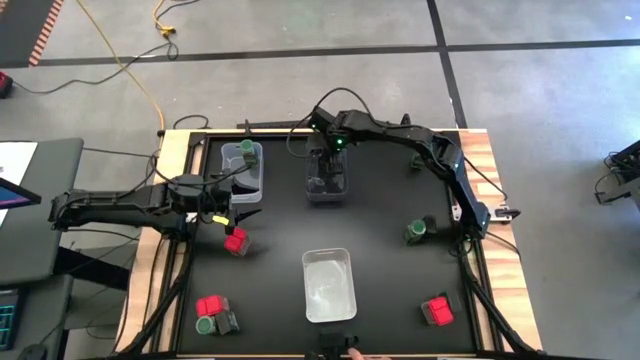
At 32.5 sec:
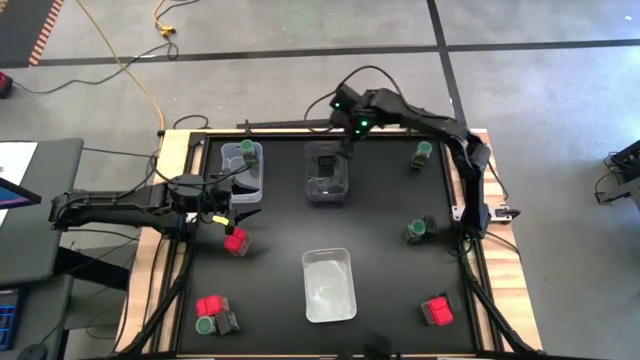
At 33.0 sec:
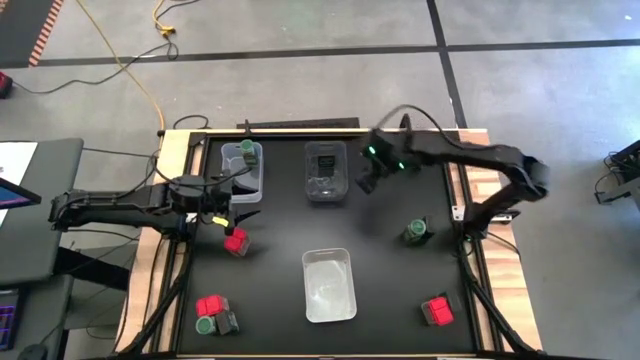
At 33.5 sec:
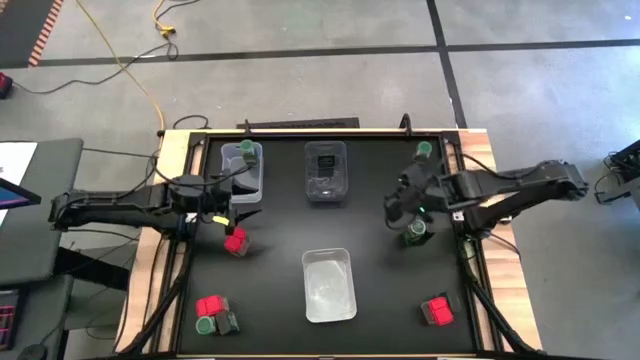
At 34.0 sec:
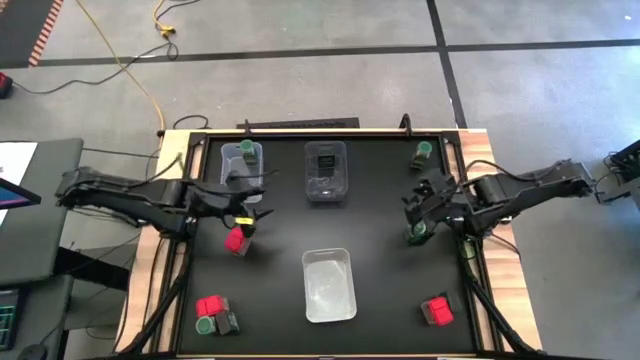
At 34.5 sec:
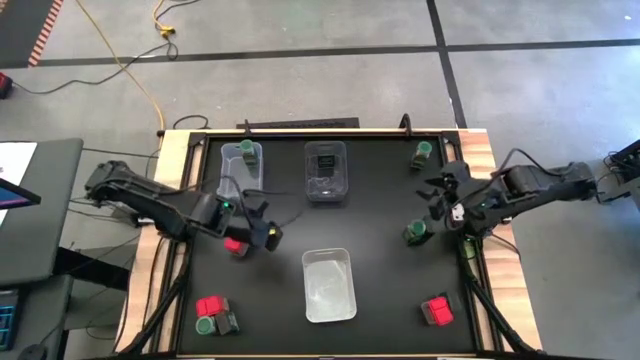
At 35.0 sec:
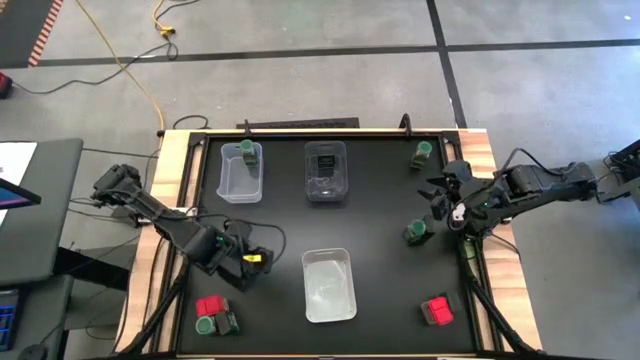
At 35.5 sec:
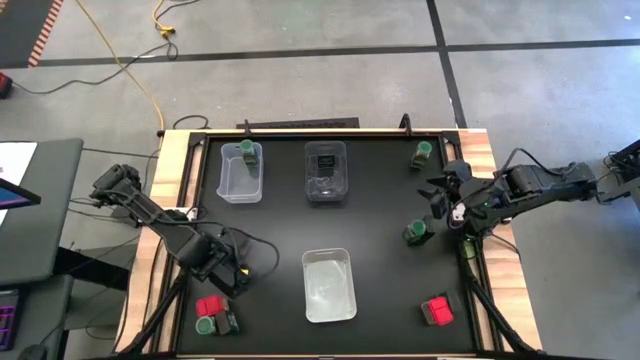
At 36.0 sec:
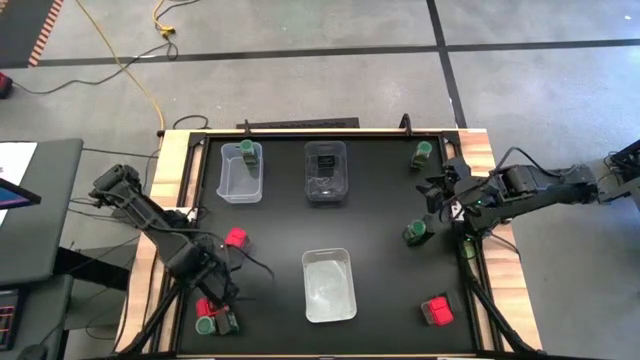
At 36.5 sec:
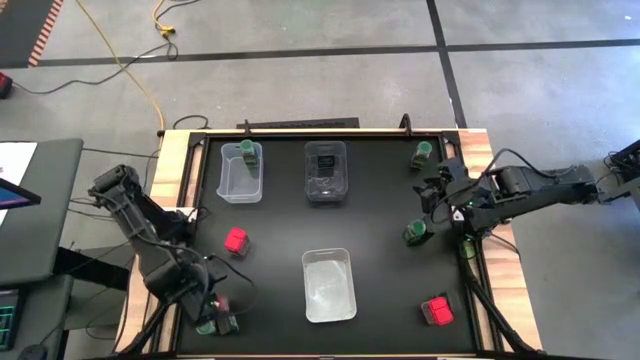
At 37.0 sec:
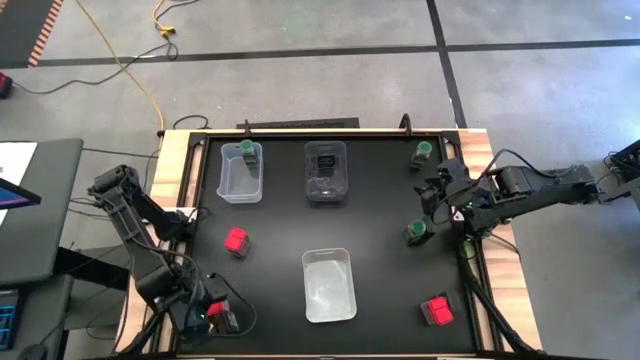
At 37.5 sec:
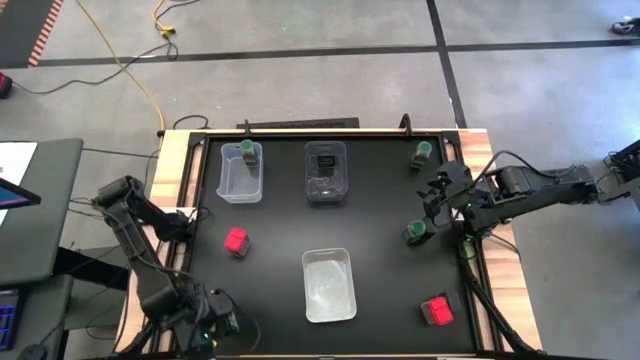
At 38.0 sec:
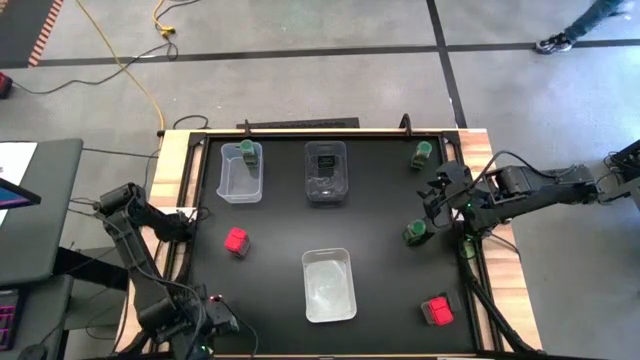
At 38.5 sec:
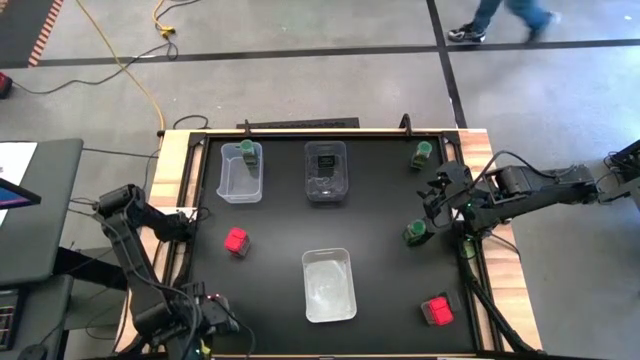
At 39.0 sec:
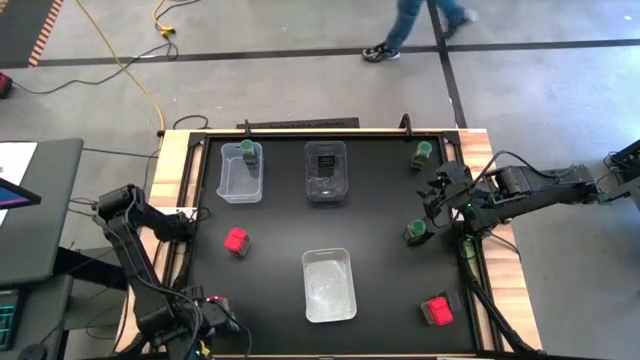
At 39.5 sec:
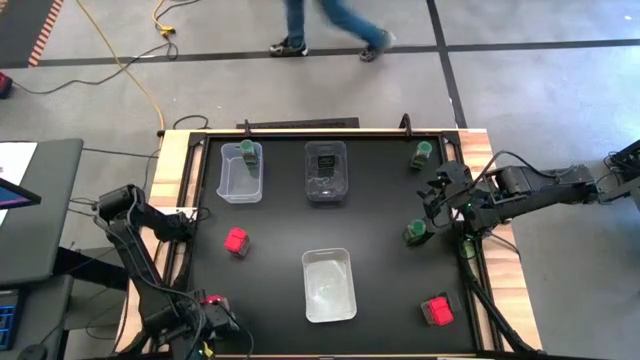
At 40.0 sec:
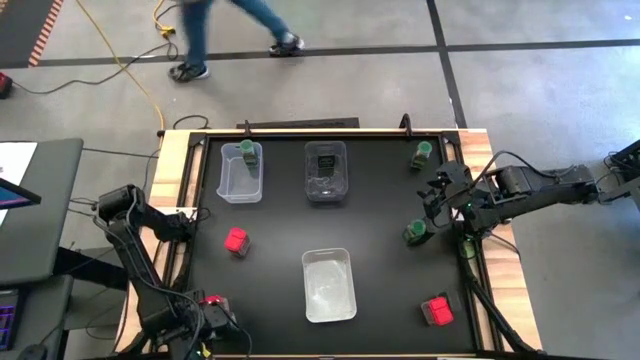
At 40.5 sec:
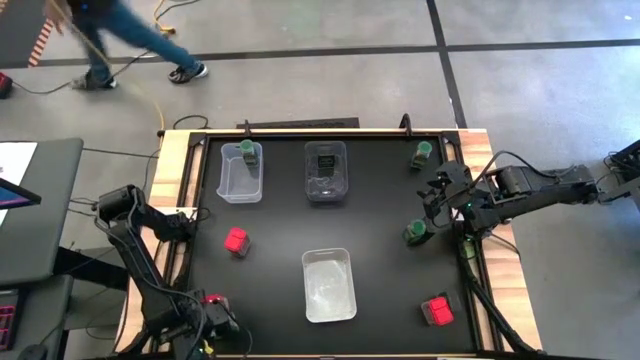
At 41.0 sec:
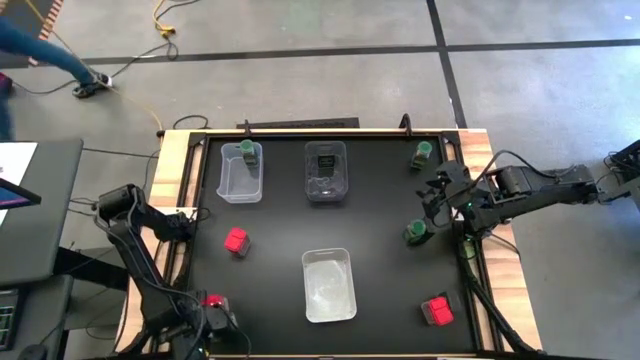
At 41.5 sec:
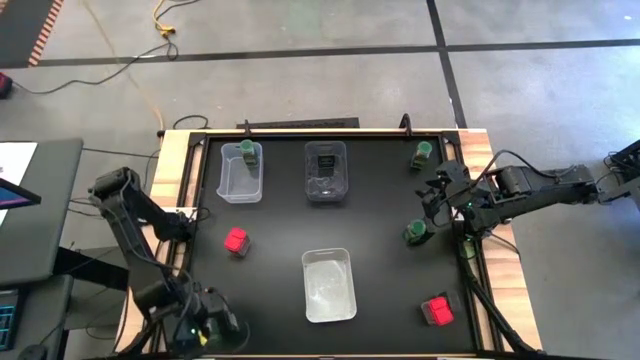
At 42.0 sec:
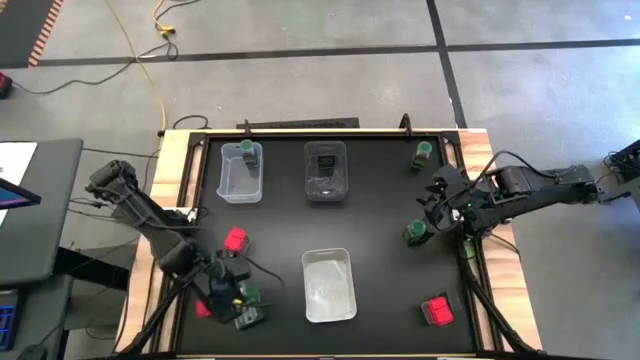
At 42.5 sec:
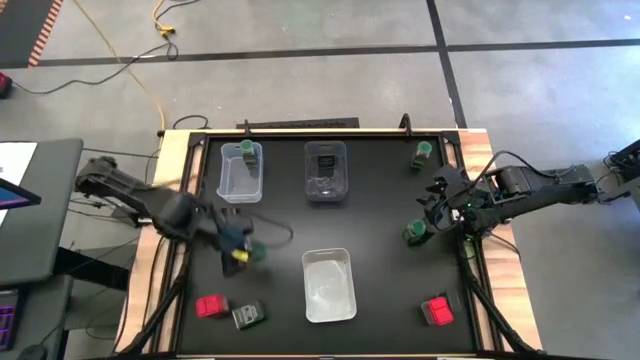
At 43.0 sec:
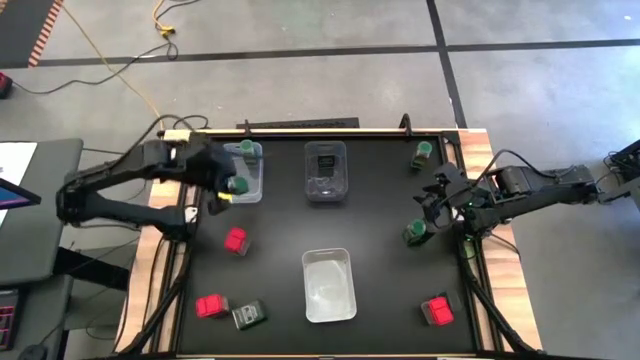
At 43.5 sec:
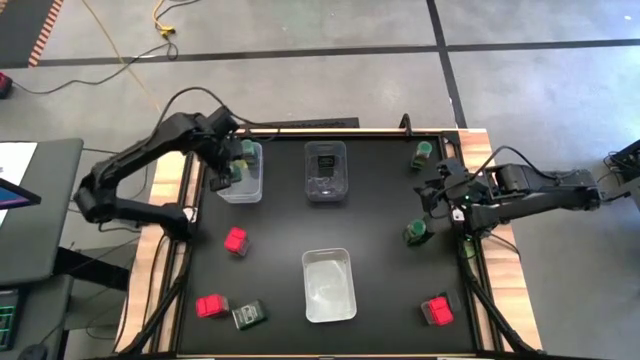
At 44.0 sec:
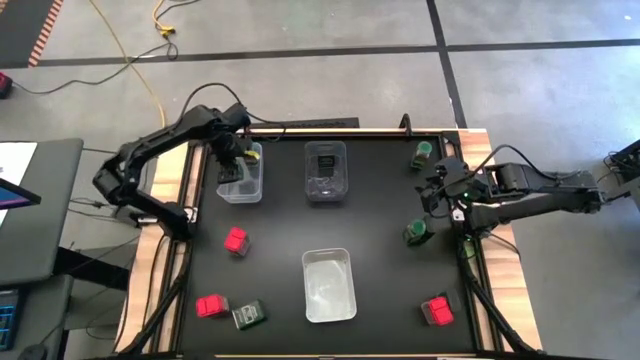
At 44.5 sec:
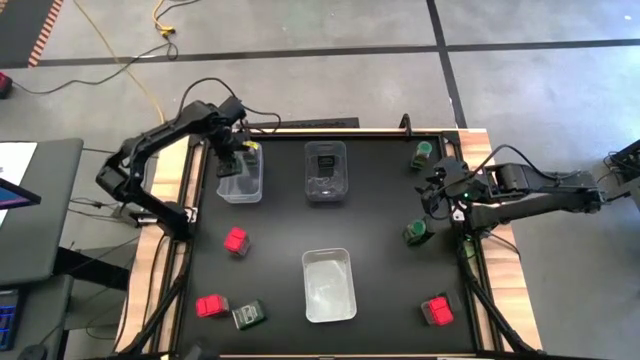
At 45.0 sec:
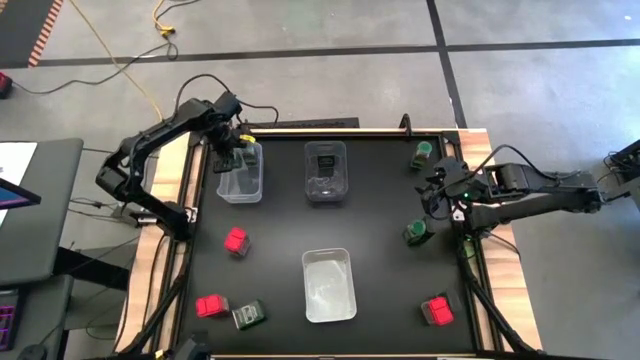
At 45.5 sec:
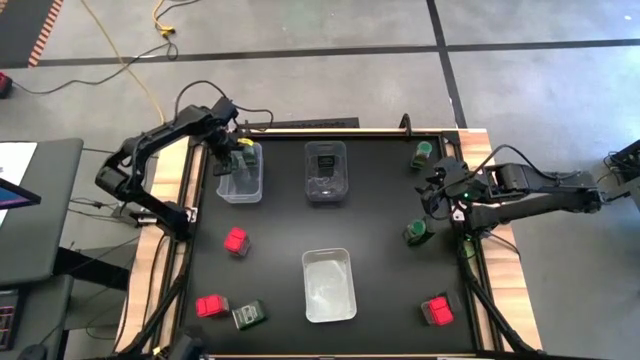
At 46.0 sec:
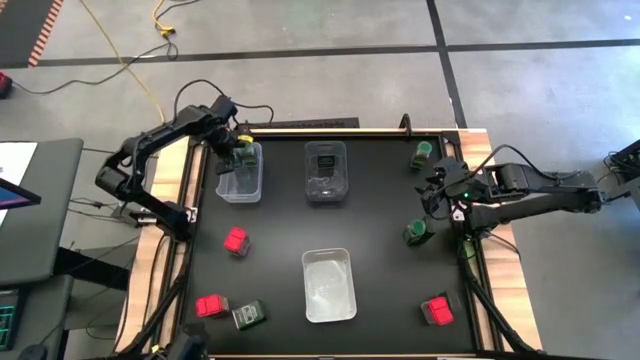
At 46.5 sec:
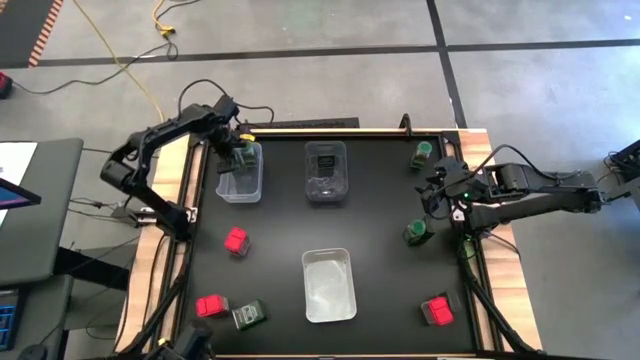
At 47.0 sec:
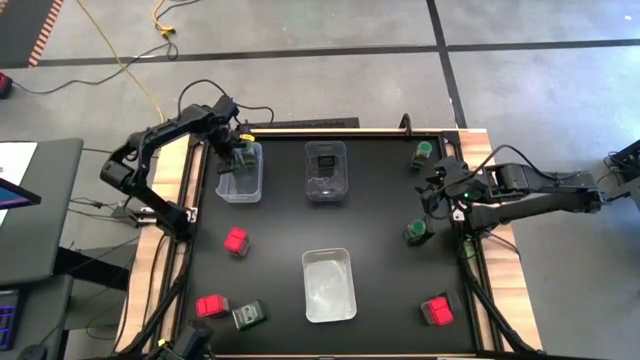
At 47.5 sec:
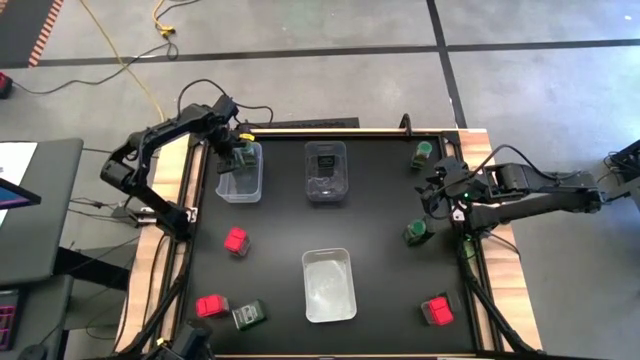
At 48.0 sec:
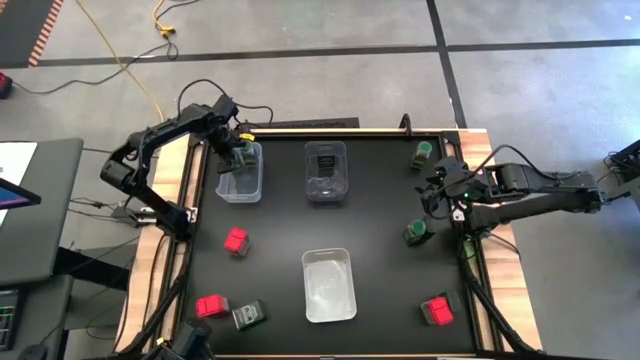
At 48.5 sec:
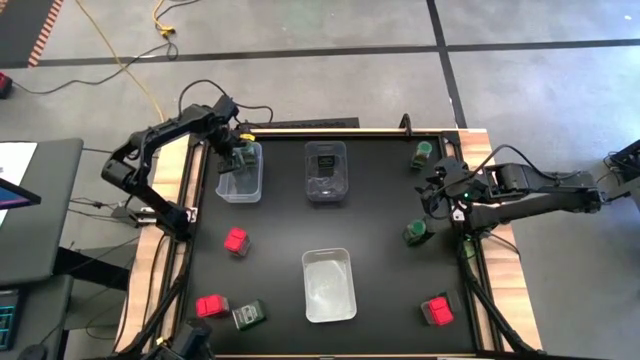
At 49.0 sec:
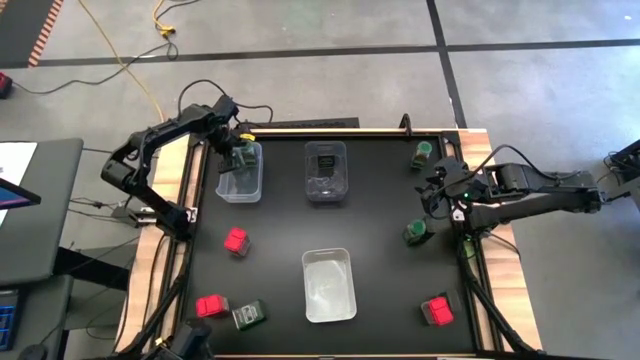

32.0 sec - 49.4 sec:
Task: Sort spices by type
Put the bottom green seasoning bottle into the transparent bin

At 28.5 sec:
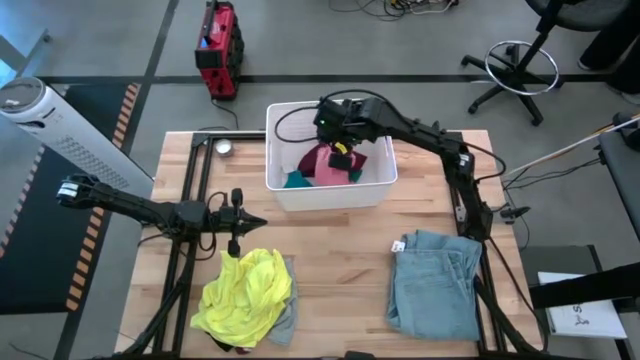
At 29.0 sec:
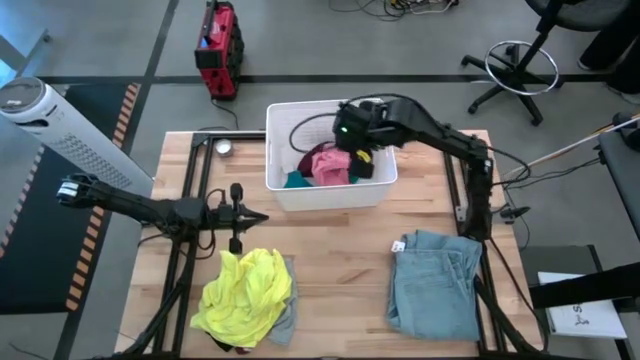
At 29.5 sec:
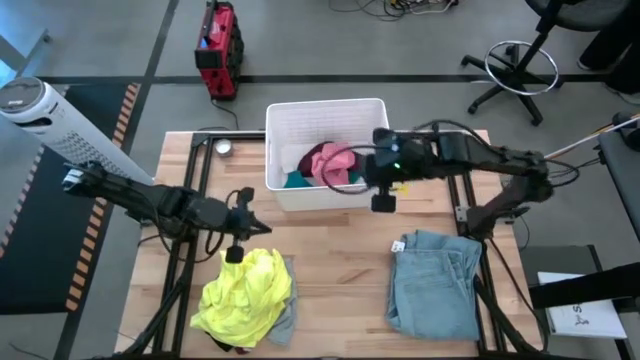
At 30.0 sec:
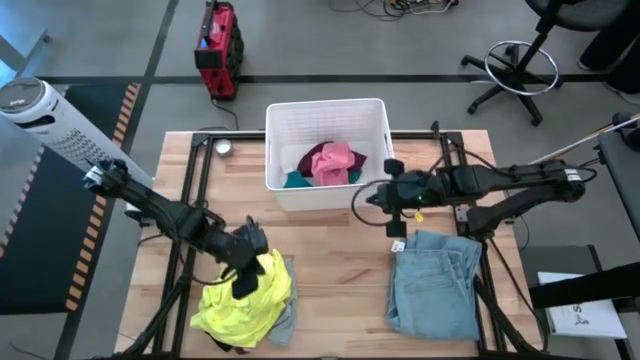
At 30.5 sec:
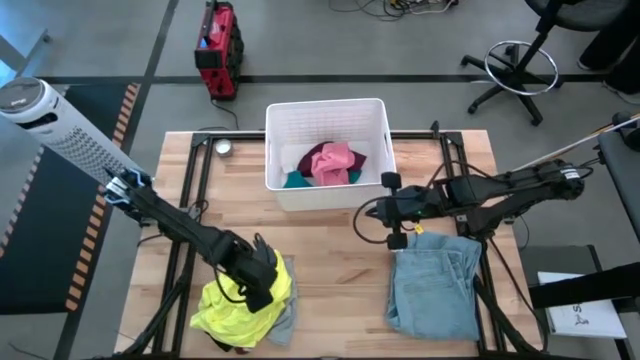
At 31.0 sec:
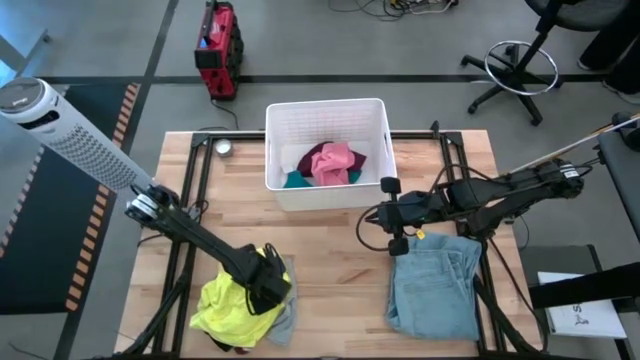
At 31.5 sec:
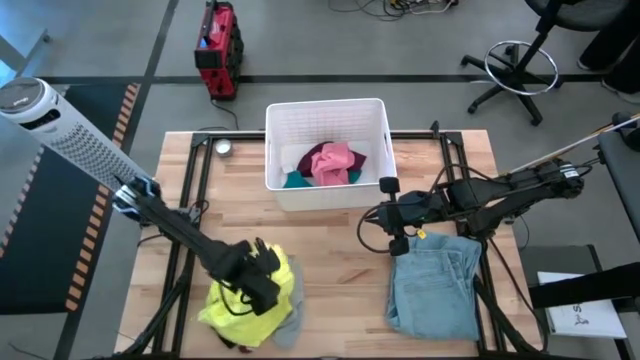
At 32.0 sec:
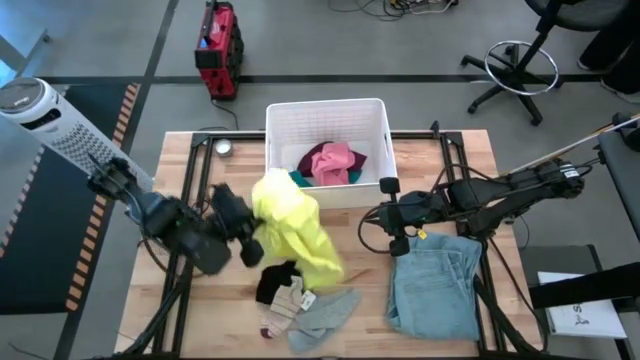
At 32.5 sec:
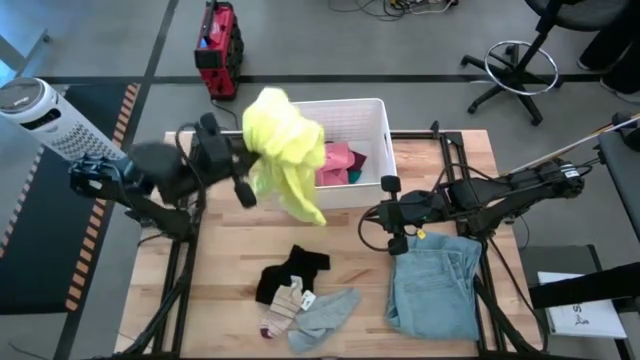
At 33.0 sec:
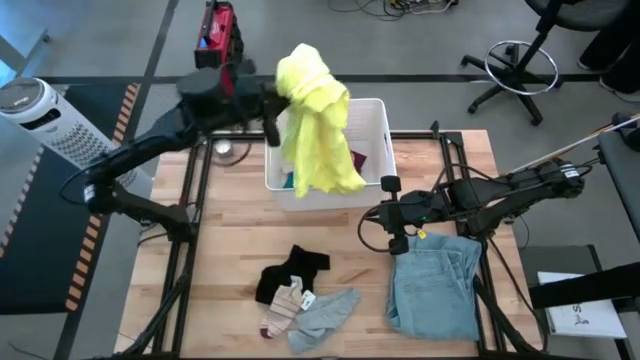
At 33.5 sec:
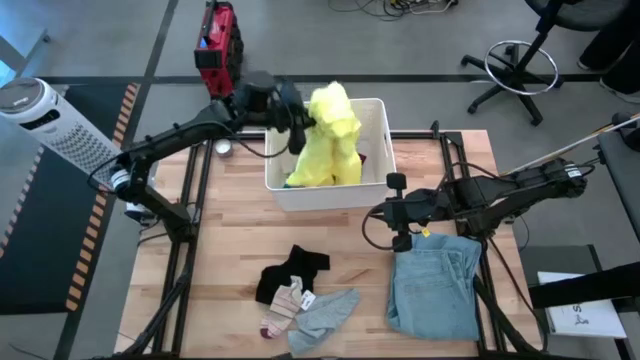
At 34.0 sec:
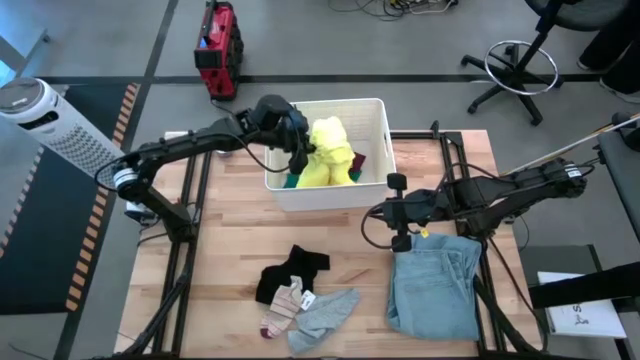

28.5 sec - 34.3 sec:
Task: Sort clothes
Put the yellow shirt into the white laundry bin
